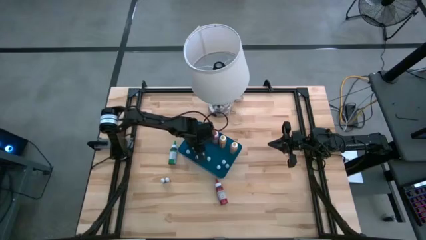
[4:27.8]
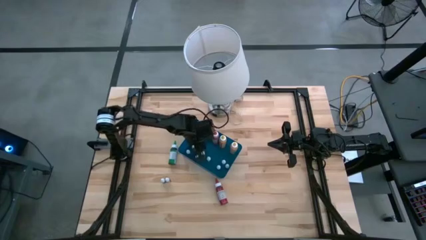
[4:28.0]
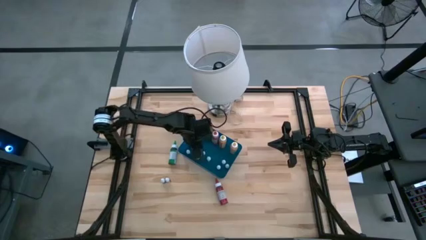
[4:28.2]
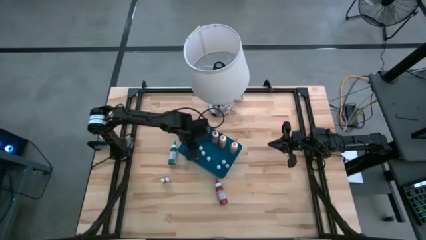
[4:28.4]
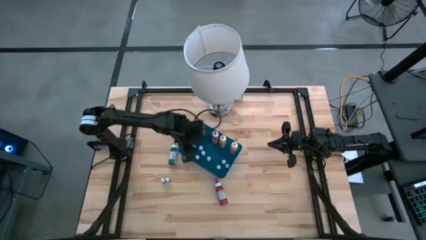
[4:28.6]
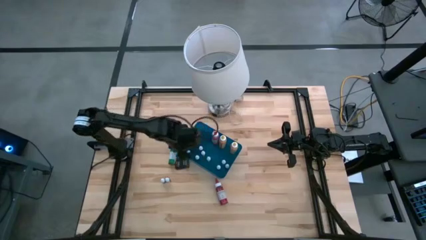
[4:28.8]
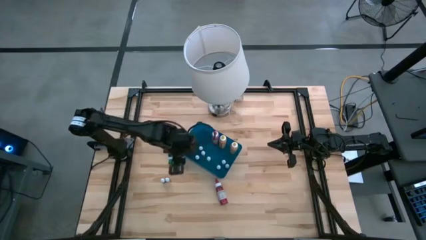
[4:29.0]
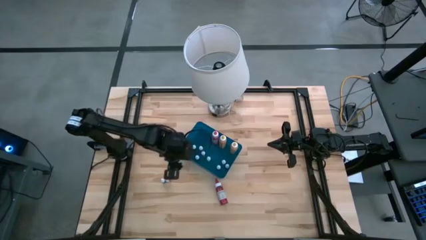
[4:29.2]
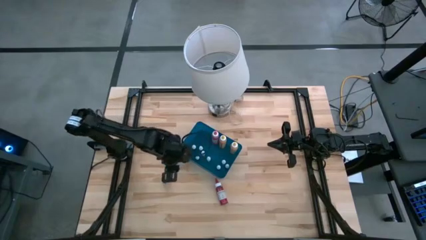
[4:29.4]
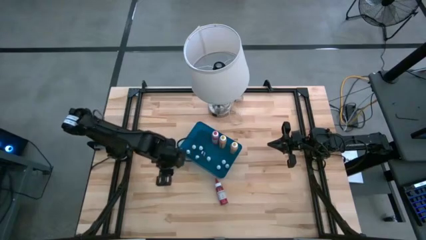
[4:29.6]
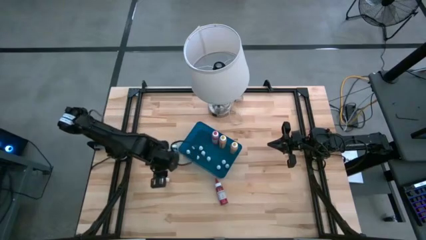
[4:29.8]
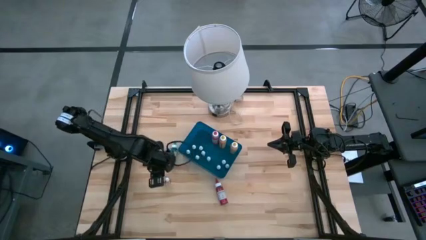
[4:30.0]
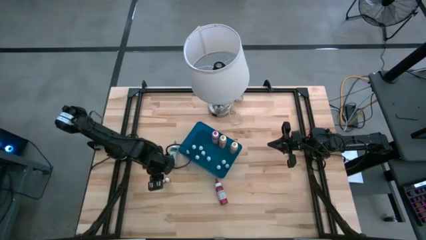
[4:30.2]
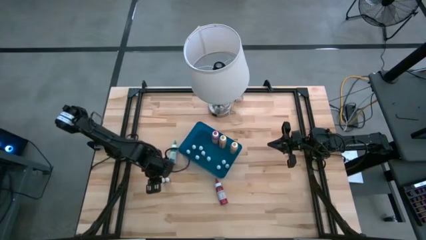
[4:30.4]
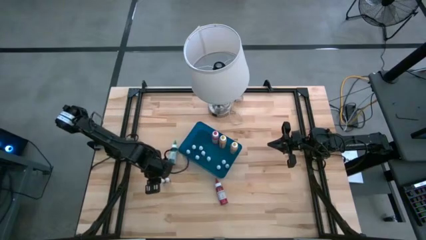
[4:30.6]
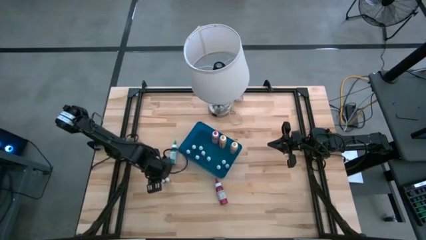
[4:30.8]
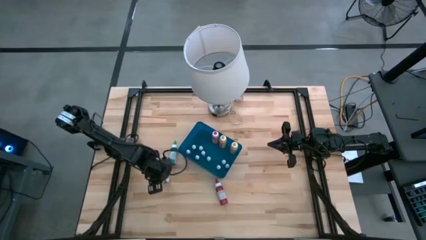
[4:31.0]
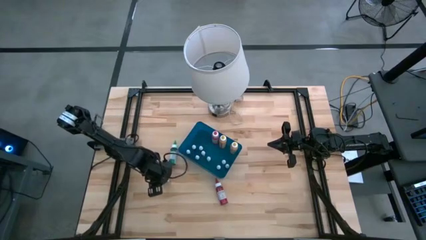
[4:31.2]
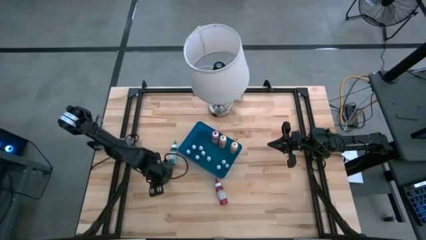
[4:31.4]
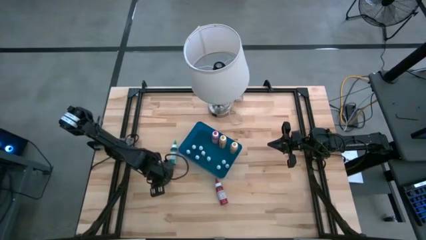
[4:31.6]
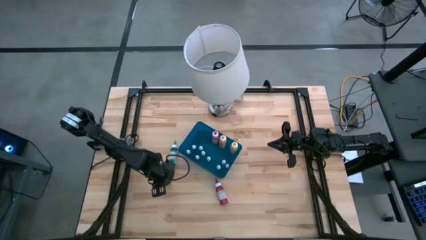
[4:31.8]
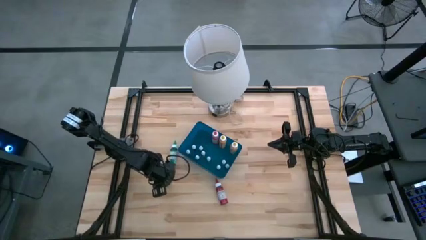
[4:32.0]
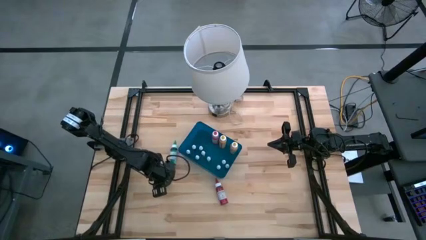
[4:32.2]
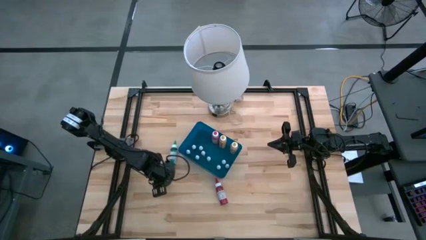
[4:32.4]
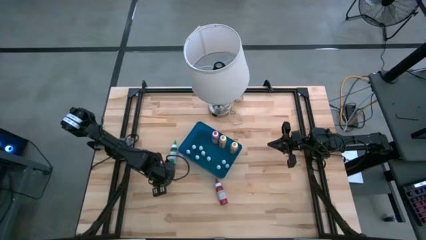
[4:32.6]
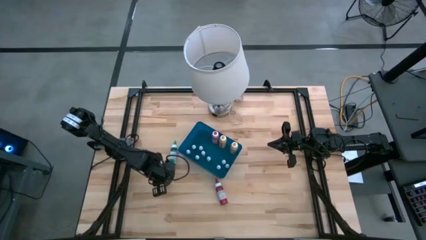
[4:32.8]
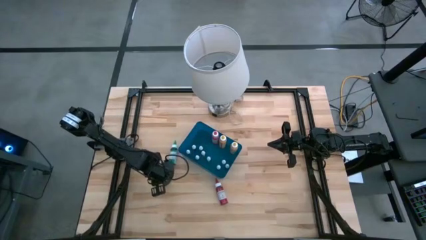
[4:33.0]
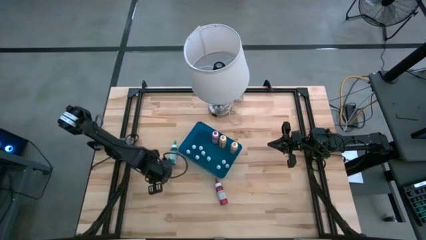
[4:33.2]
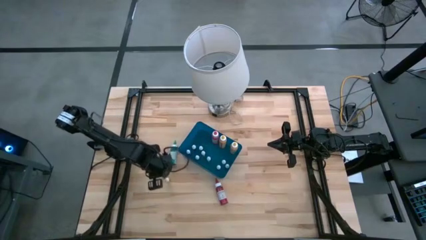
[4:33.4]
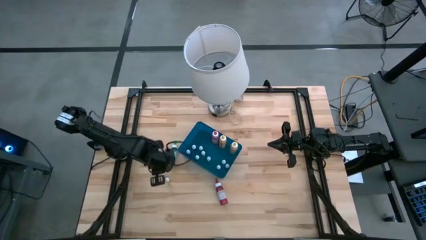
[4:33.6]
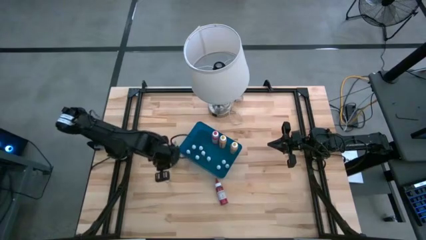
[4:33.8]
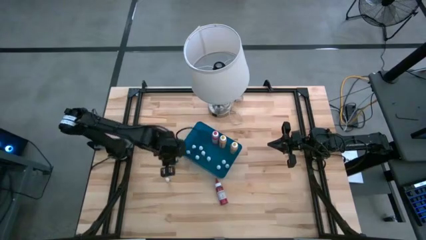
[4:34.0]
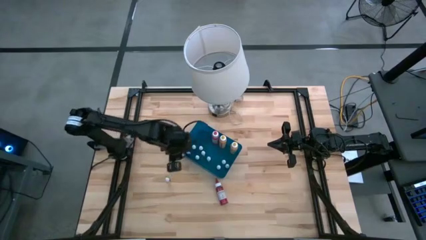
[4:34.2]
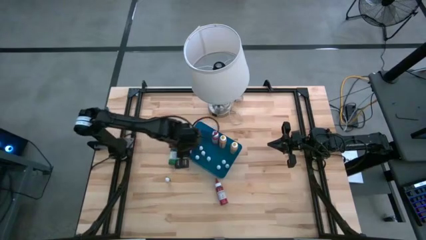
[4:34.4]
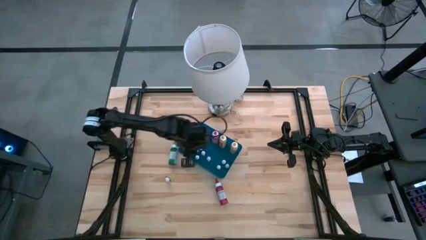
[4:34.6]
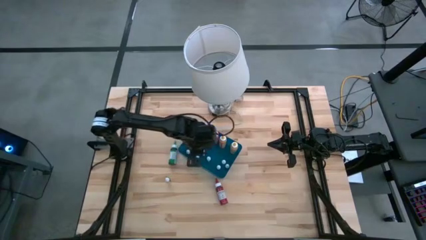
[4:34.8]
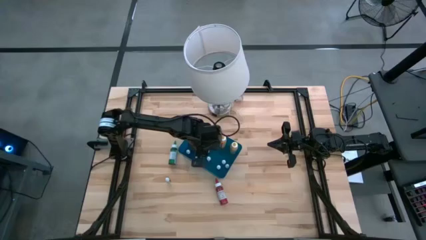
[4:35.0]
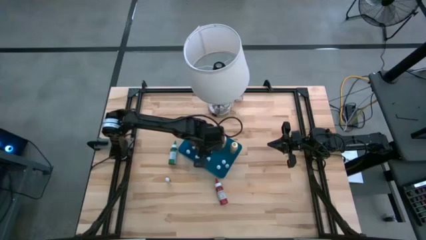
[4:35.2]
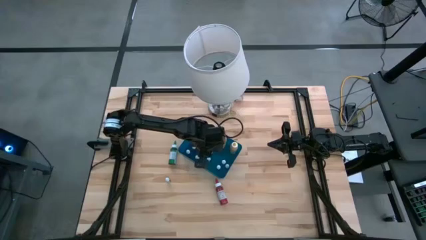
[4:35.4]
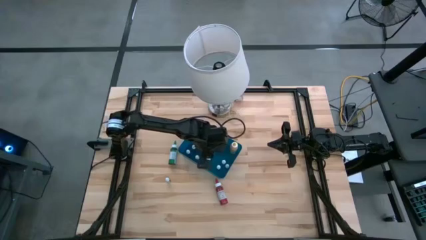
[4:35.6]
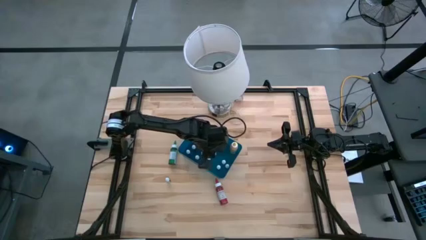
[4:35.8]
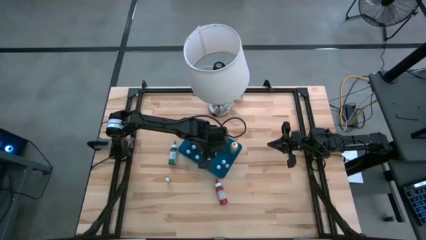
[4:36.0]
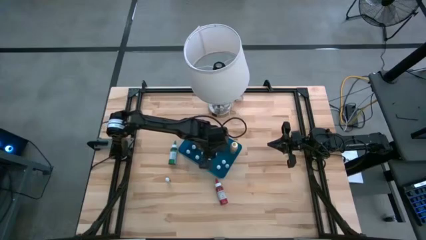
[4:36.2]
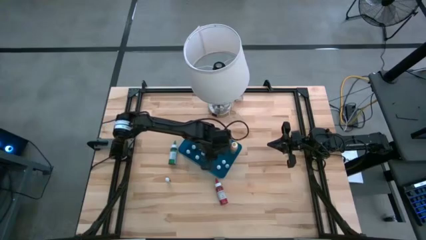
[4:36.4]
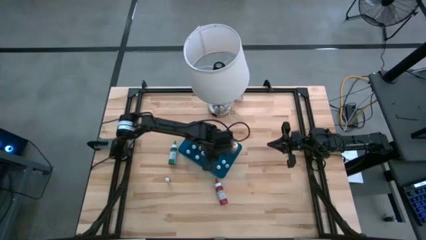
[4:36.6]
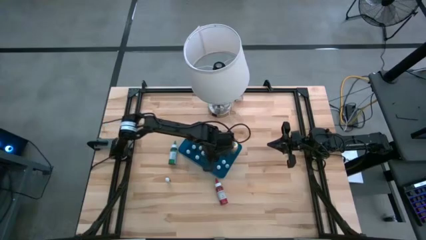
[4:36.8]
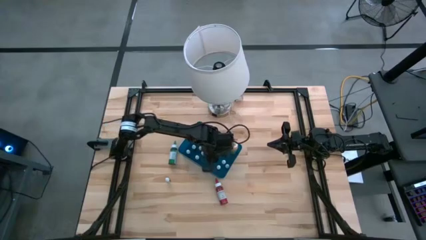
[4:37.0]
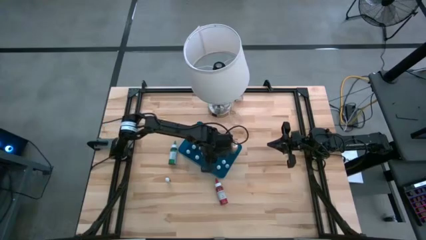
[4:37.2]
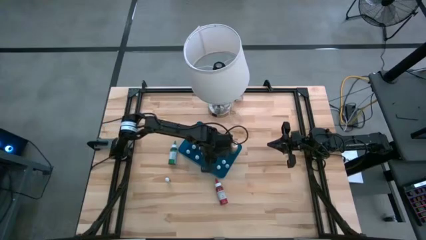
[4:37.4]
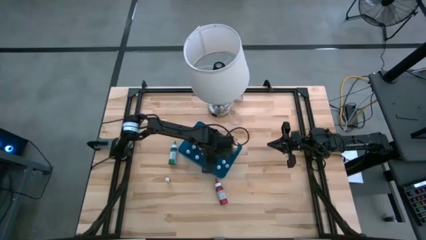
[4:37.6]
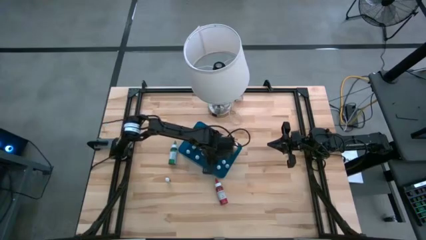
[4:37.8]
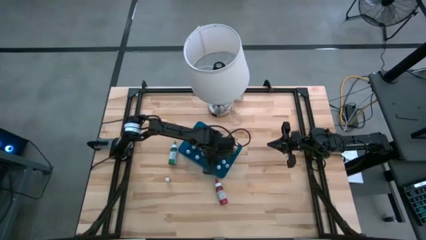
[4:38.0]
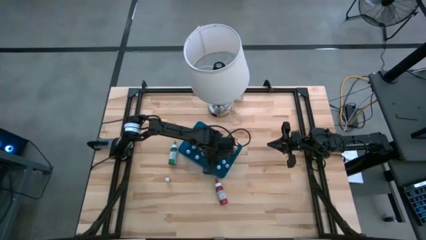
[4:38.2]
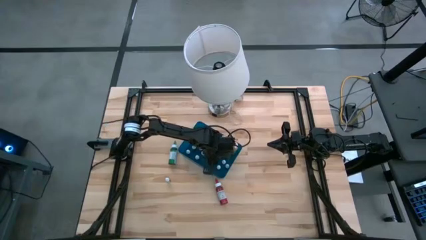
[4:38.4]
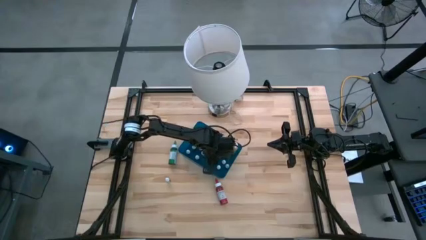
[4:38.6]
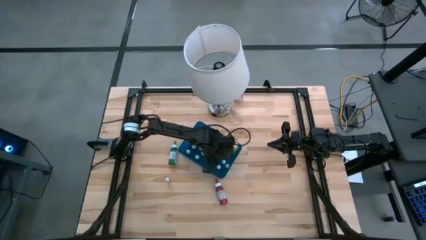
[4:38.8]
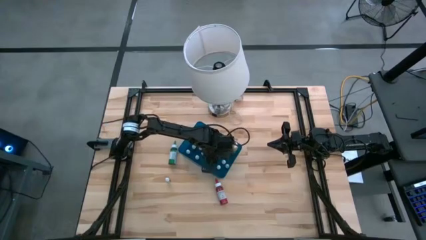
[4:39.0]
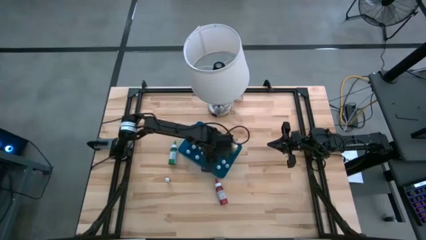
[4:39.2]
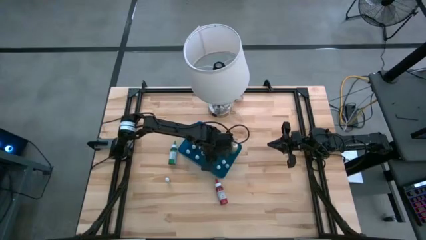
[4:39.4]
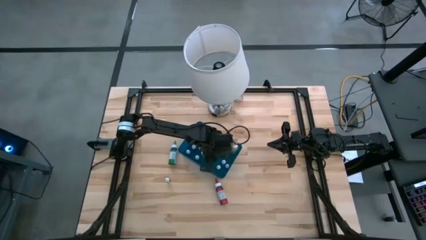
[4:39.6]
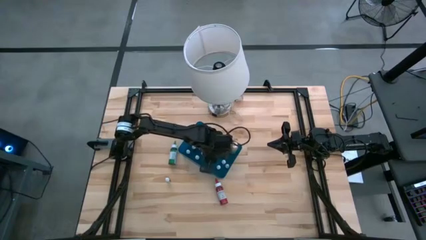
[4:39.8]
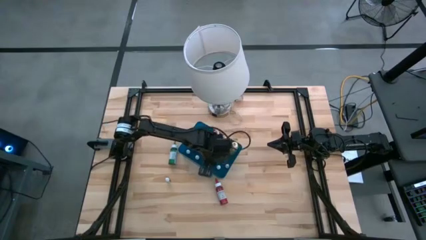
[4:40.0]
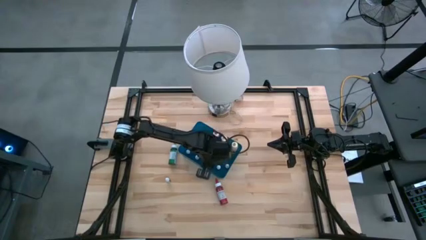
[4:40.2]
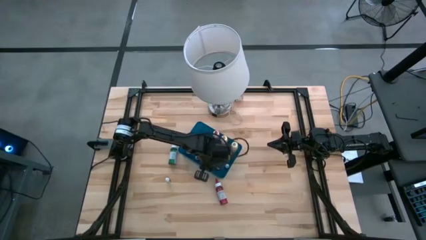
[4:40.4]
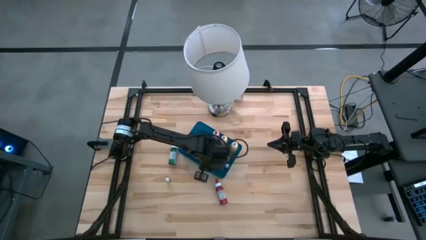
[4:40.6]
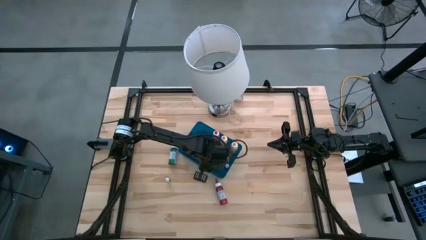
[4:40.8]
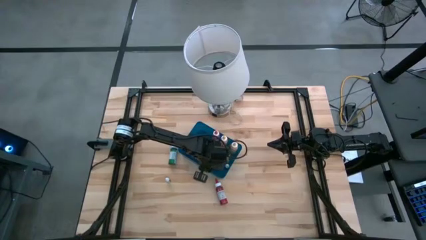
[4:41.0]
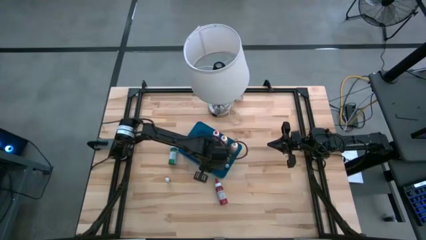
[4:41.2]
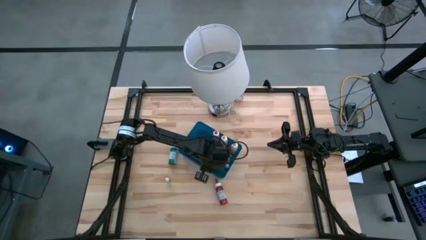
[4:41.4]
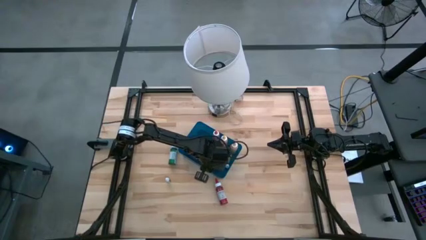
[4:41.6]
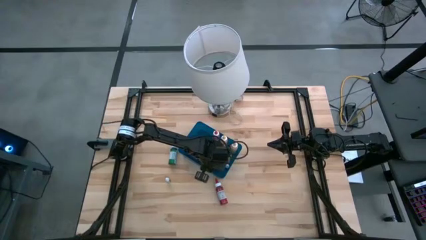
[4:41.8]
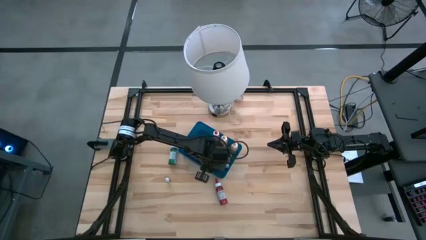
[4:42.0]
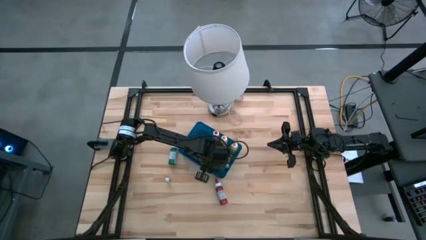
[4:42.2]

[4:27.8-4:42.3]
Task: Pick & Place food coloring
Put the small red food coloring bottle into the blue container
